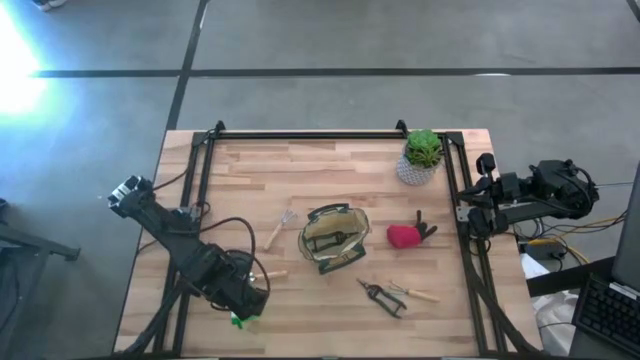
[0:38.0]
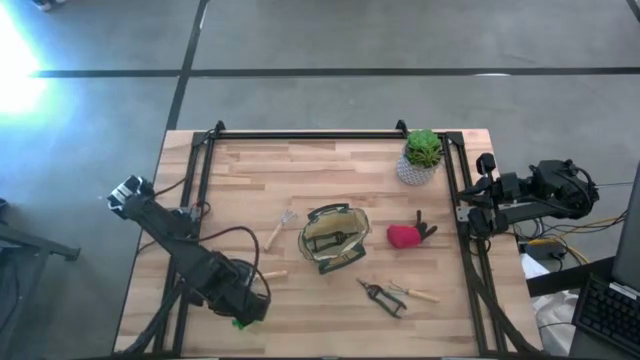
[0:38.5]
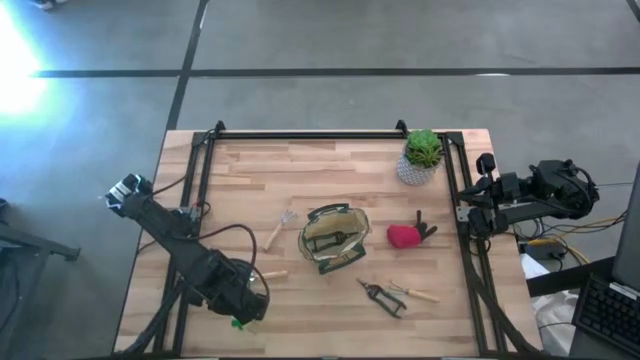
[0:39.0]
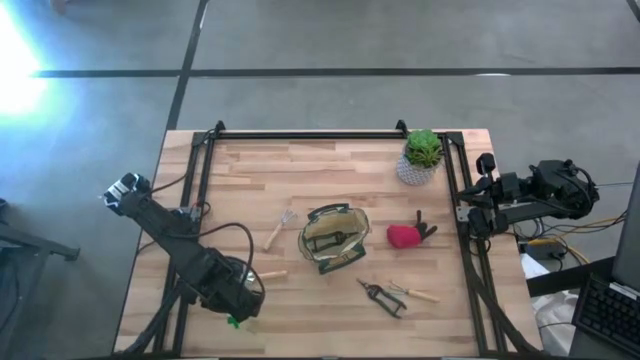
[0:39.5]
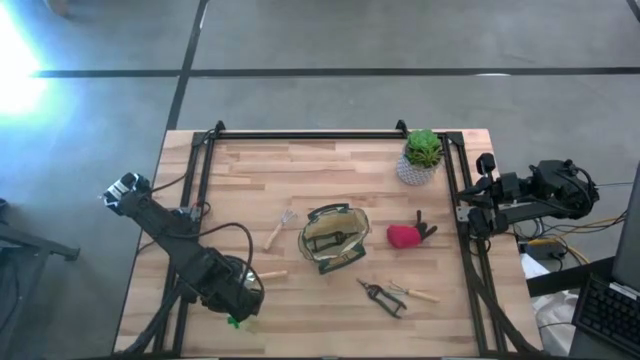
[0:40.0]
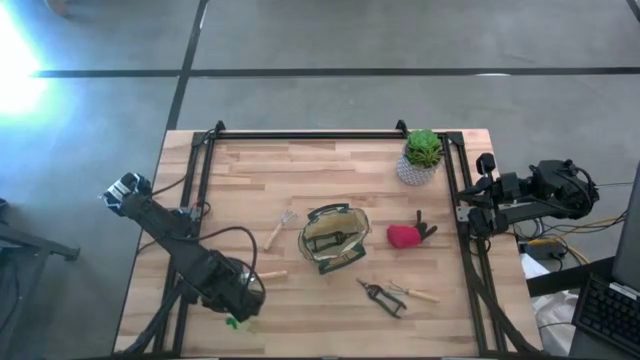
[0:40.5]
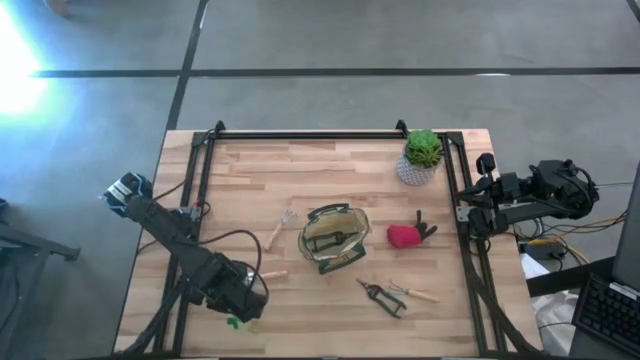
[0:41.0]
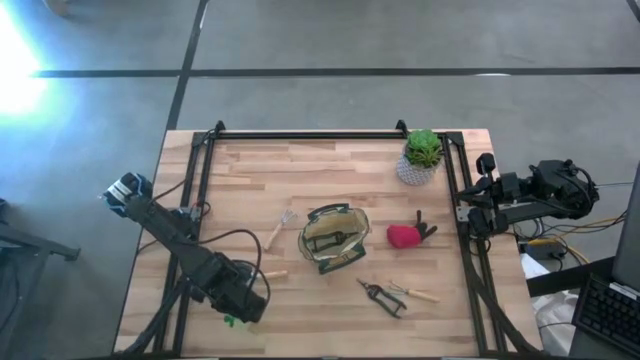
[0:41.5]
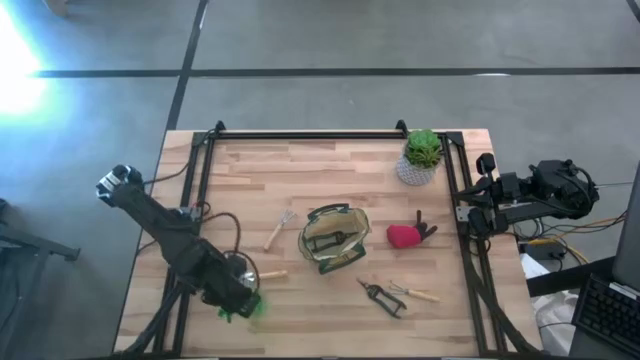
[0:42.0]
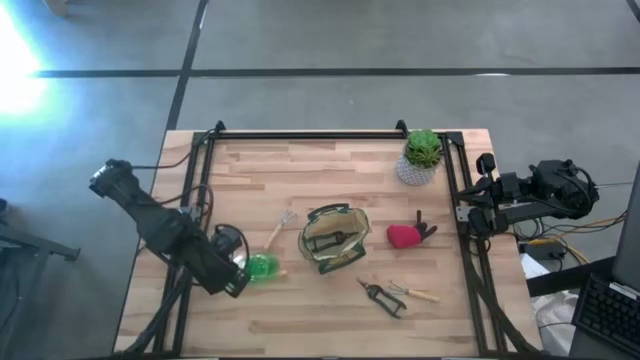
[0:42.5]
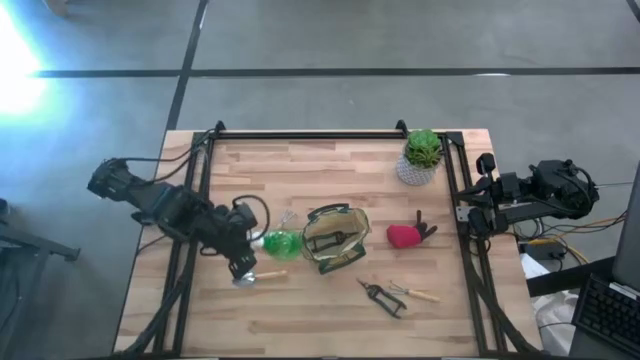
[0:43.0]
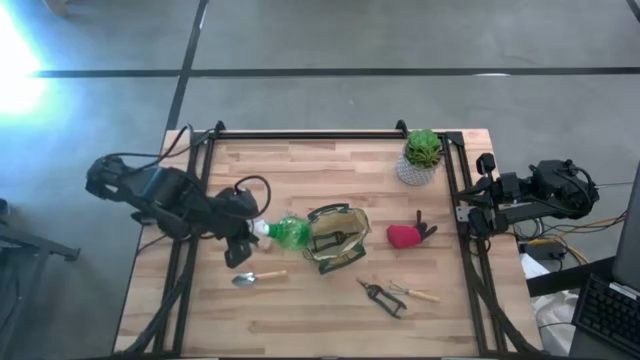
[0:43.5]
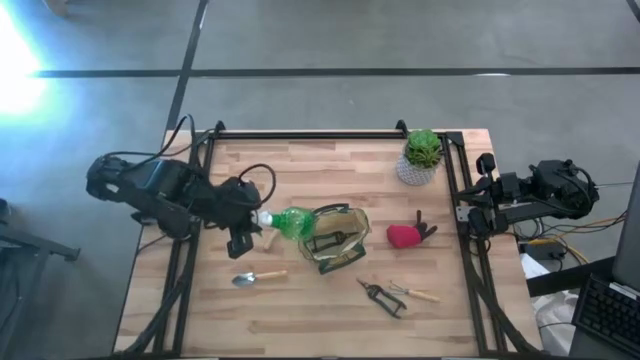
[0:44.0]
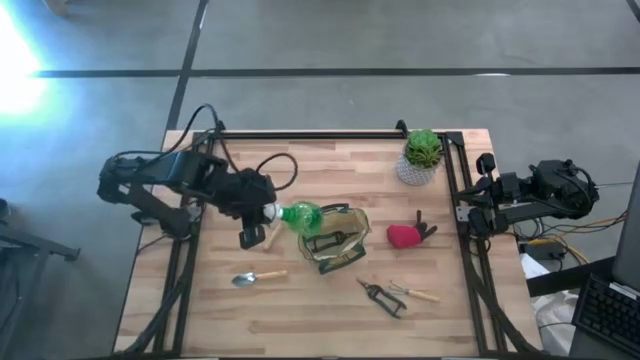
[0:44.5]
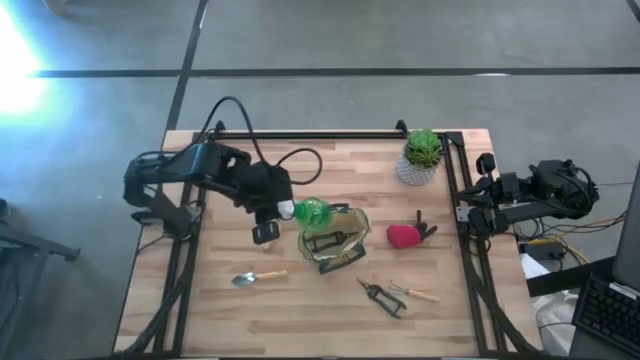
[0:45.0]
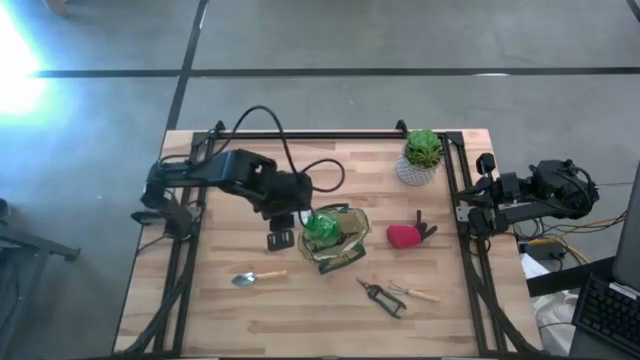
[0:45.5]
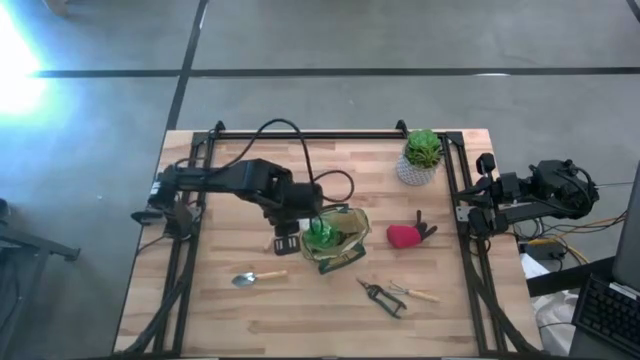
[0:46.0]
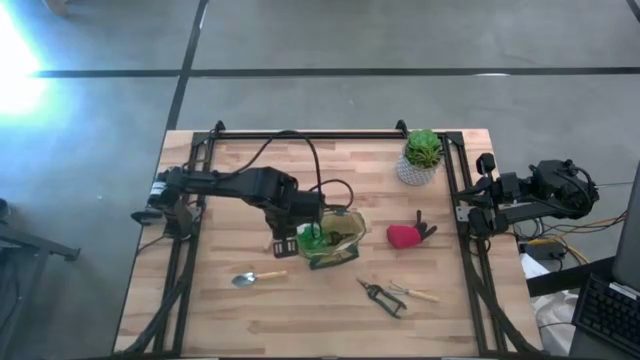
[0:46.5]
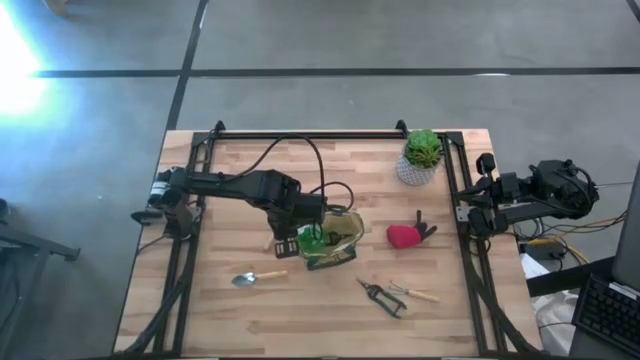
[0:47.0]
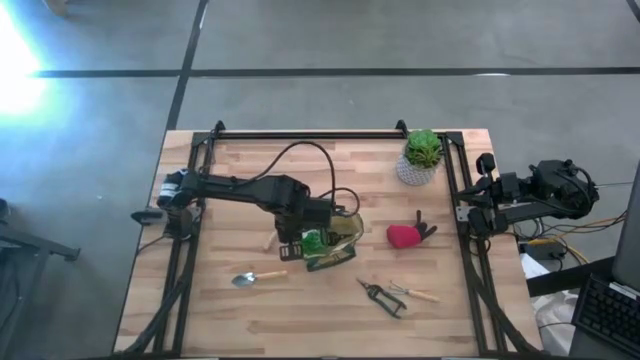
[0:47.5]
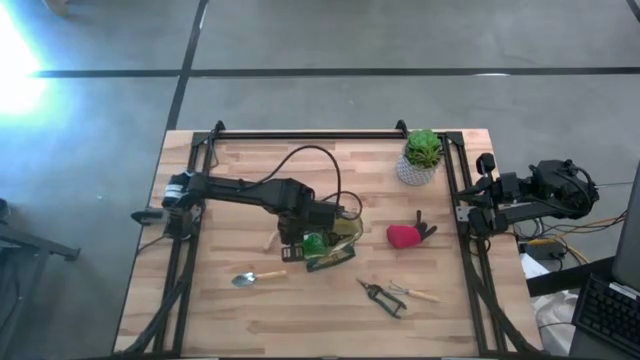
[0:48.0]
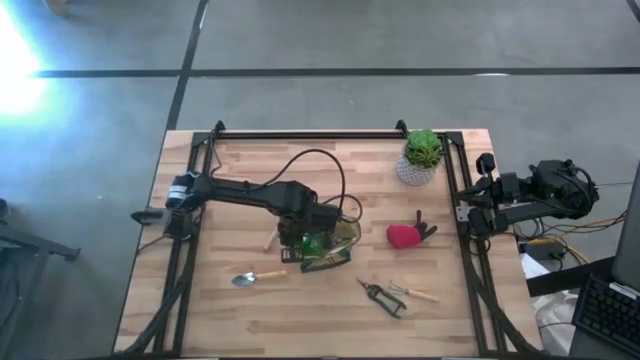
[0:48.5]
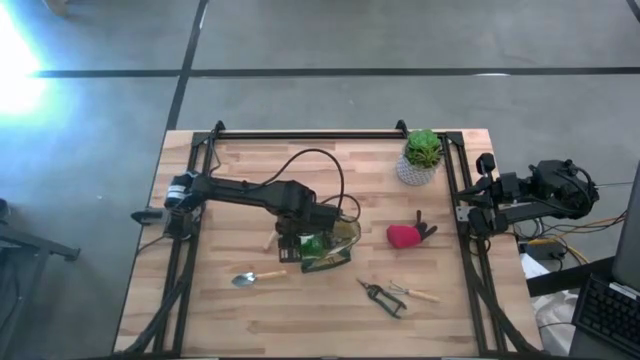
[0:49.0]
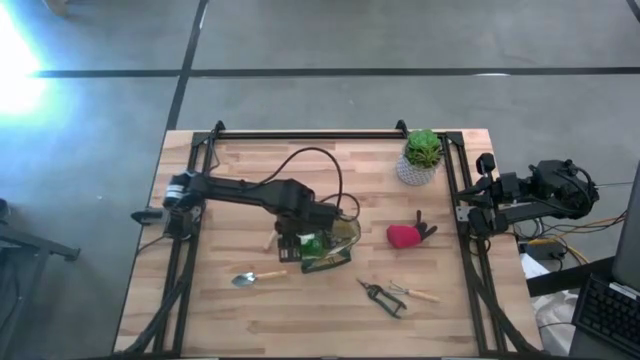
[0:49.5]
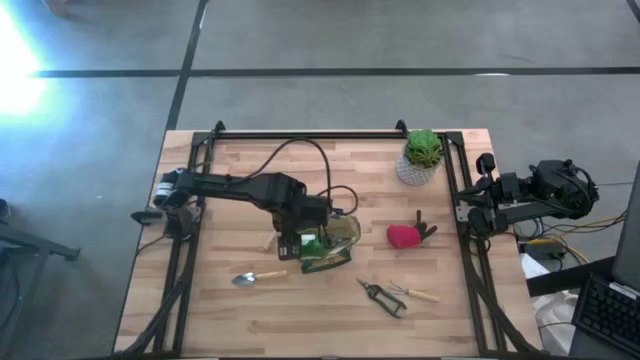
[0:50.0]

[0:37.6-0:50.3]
Task: Pick & Place Garden tools in Gardening bag
Put the green spray bottle into the green gardening bag

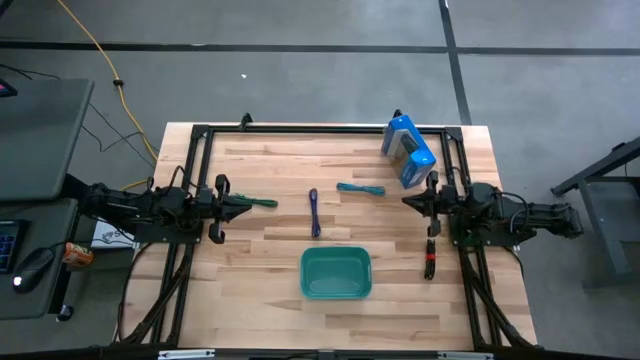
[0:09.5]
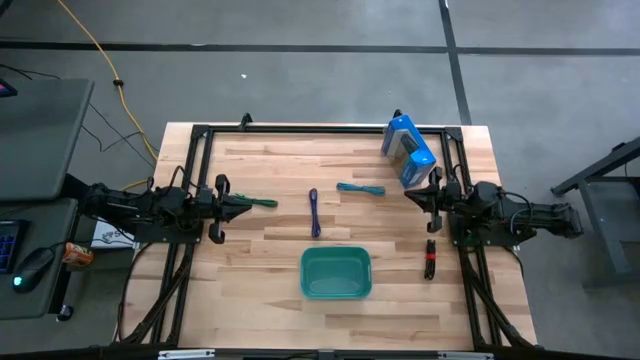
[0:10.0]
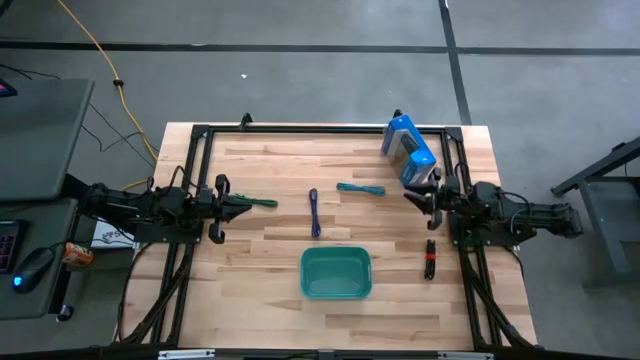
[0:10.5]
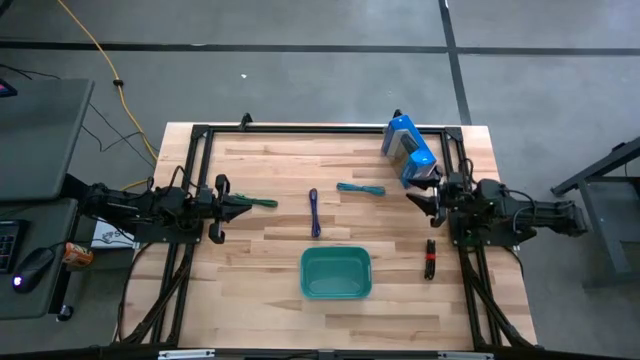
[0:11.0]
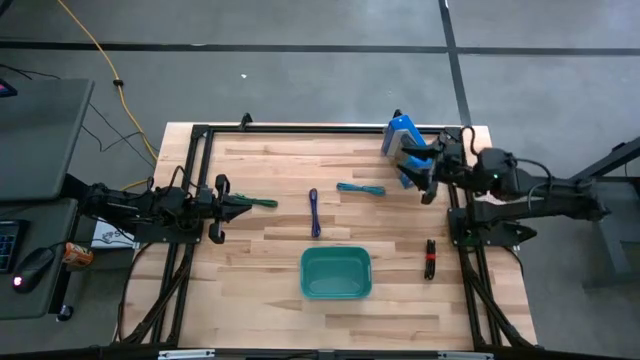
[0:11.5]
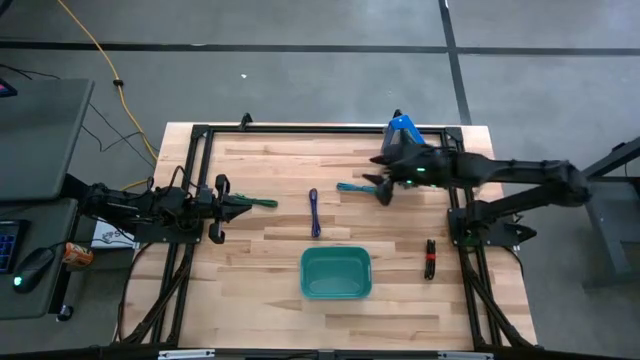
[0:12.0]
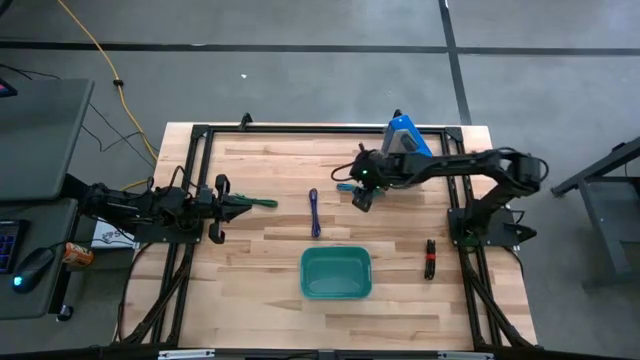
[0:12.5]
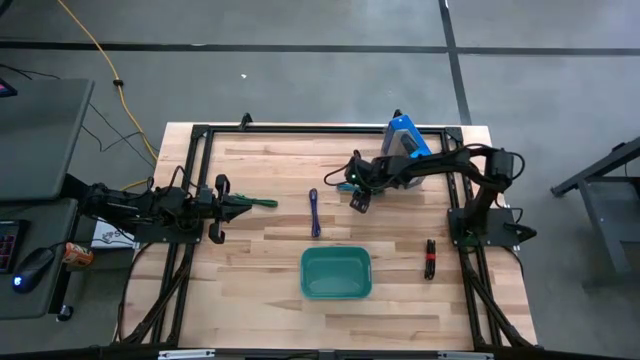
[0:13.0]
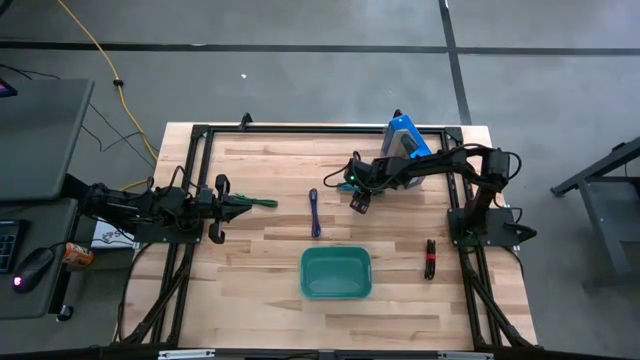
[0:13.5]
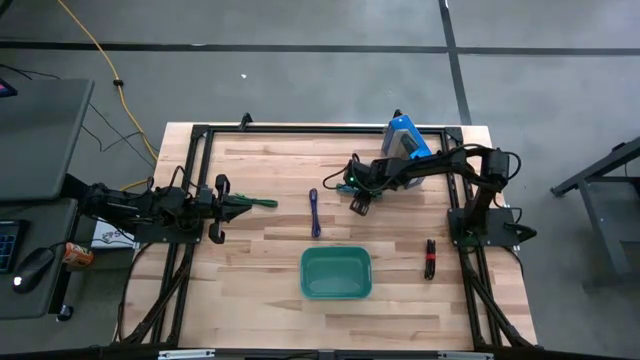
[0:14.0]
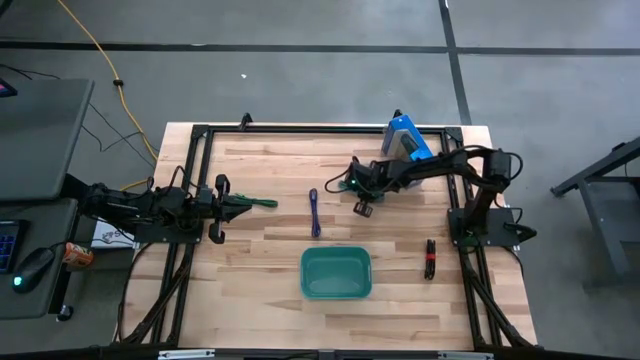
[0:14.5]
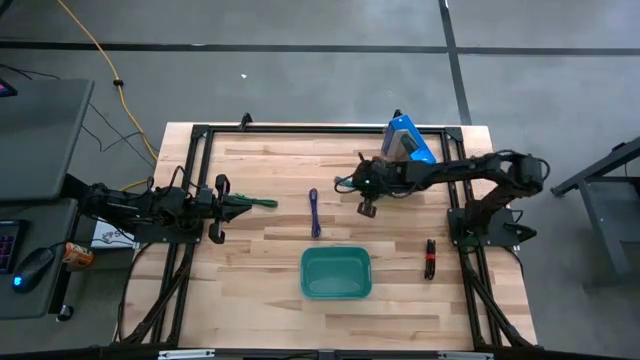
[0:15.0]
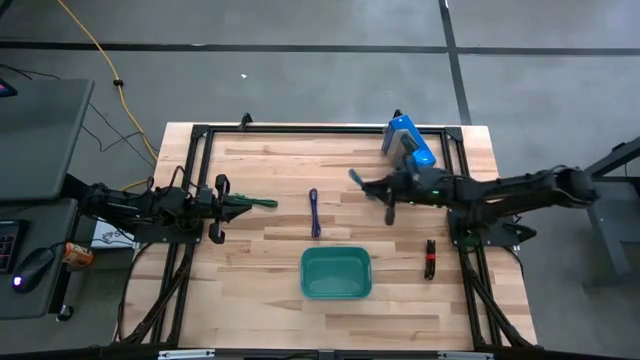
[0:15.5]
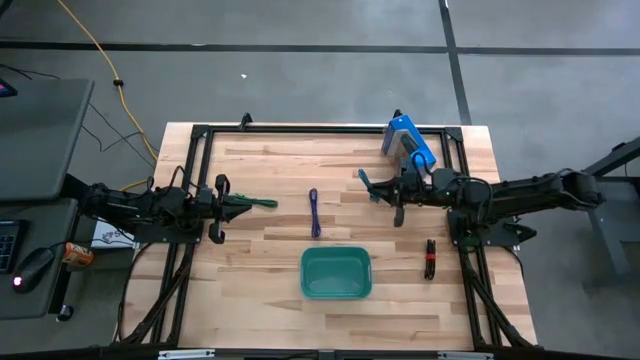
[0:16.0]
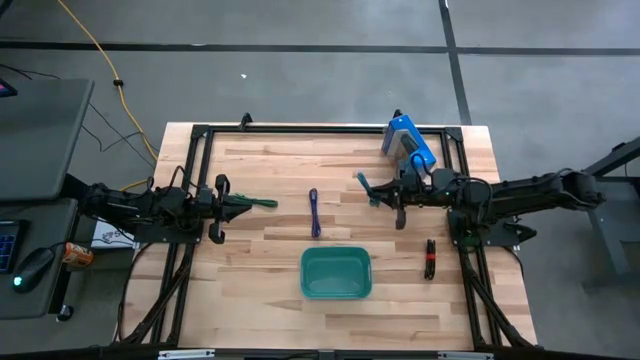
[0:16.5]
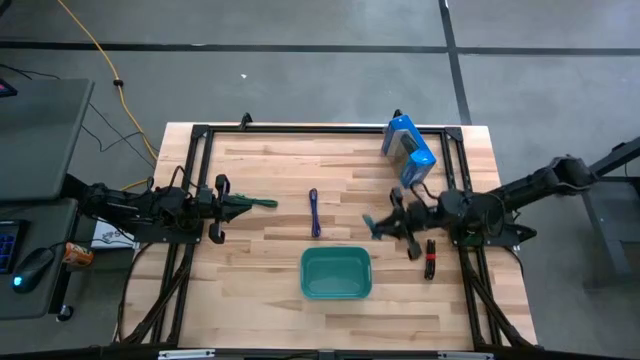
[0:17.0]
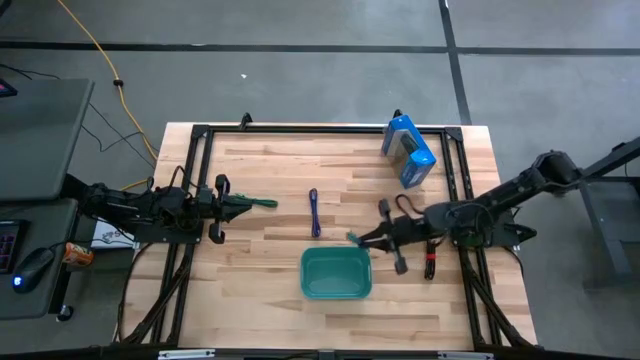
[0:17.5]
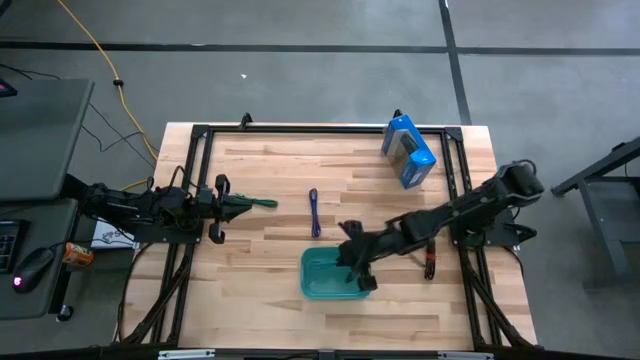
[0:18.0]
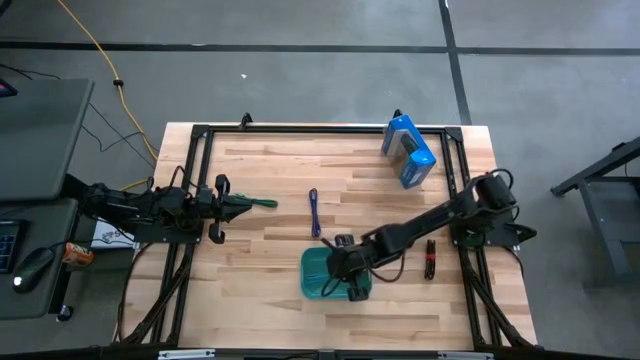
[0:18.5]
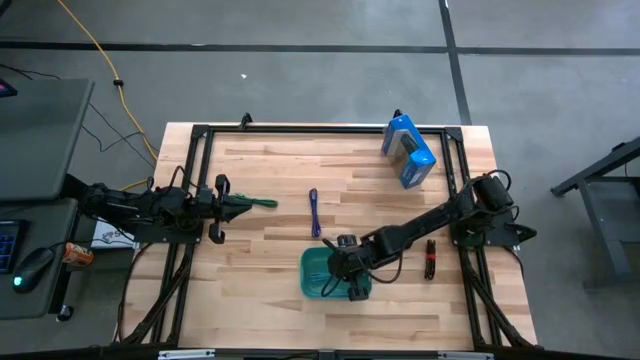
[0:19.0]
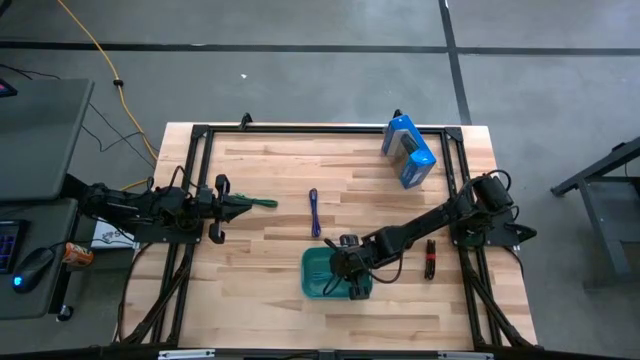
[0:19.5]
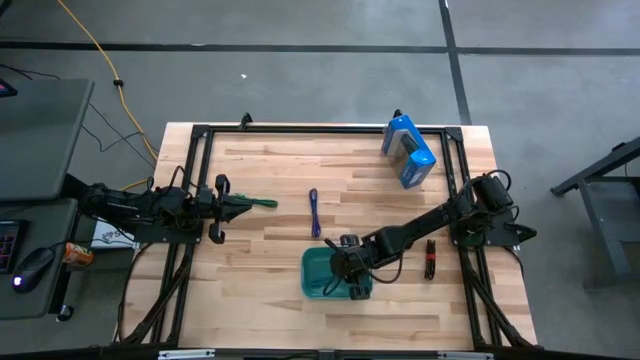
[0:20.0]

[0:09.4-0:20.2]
Task: Pick and place USB-C Cables
Put the black blue charger cable into the green bin
